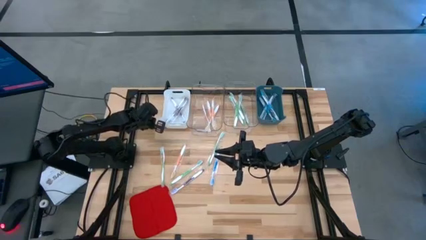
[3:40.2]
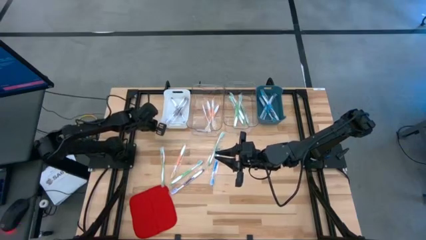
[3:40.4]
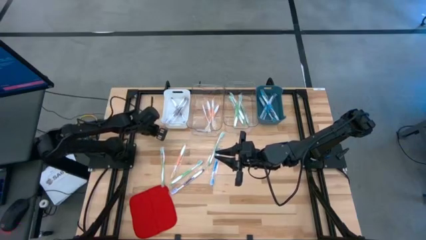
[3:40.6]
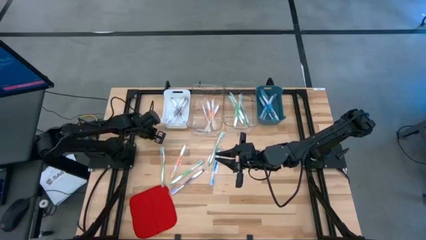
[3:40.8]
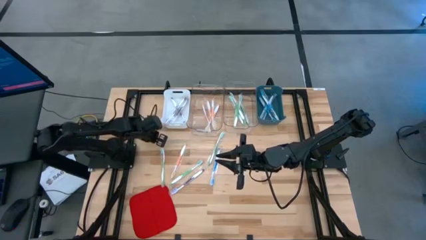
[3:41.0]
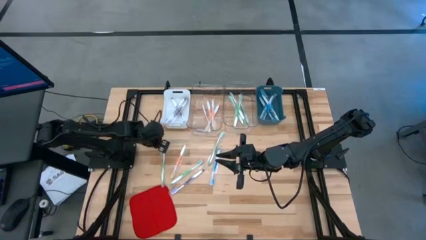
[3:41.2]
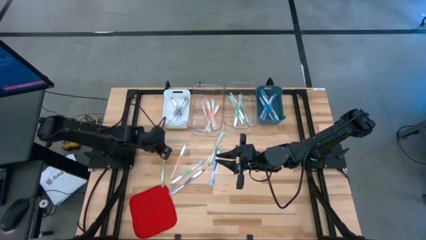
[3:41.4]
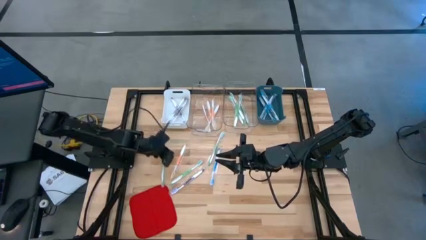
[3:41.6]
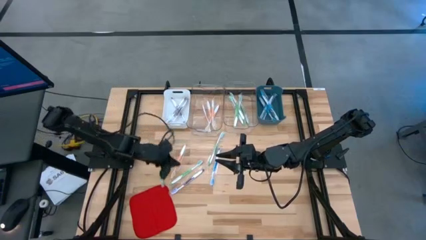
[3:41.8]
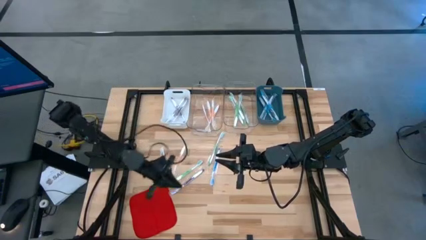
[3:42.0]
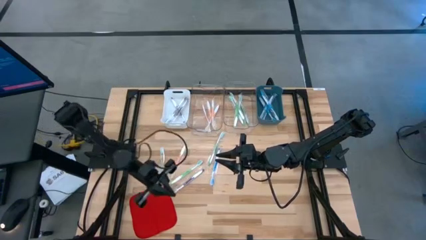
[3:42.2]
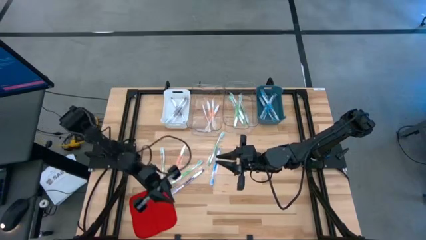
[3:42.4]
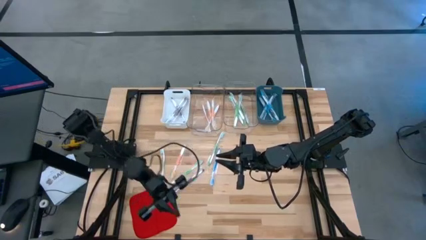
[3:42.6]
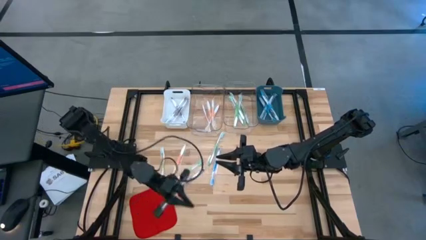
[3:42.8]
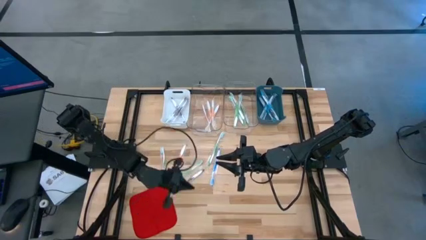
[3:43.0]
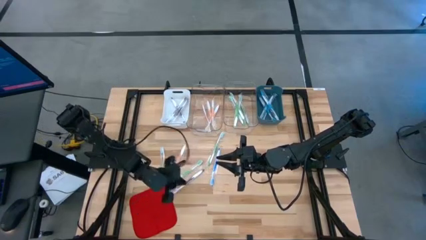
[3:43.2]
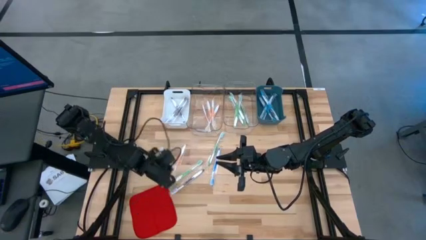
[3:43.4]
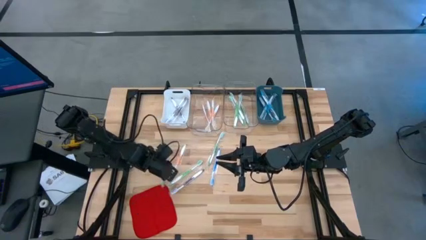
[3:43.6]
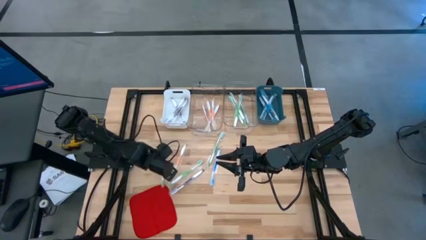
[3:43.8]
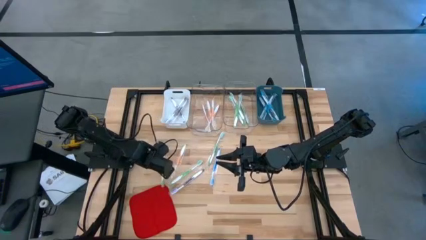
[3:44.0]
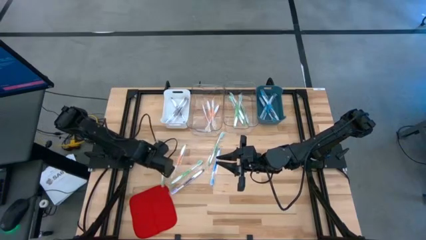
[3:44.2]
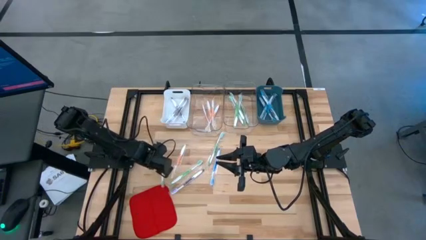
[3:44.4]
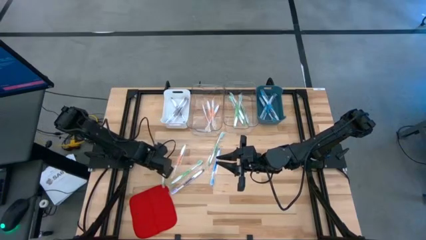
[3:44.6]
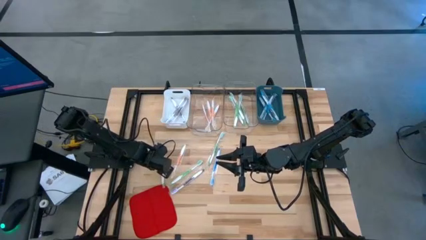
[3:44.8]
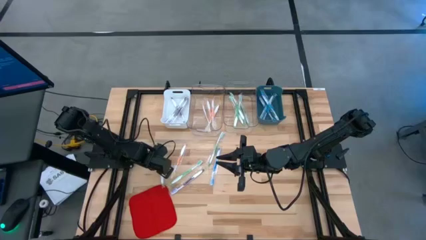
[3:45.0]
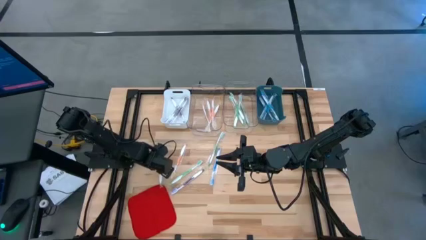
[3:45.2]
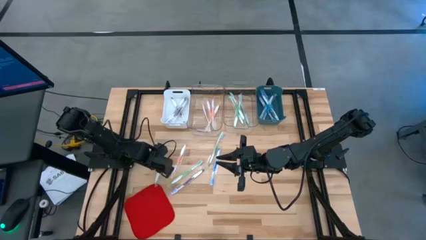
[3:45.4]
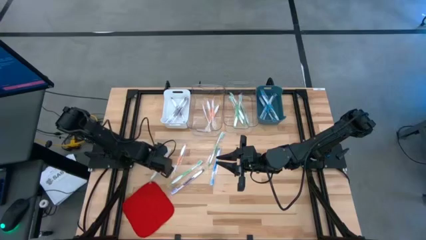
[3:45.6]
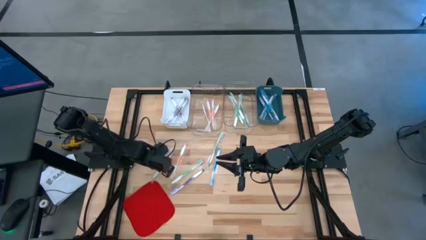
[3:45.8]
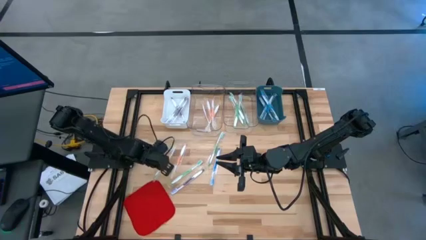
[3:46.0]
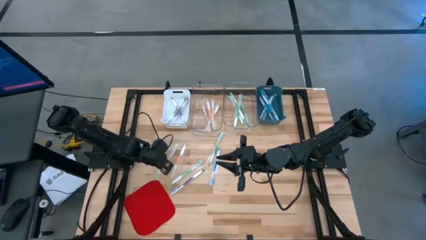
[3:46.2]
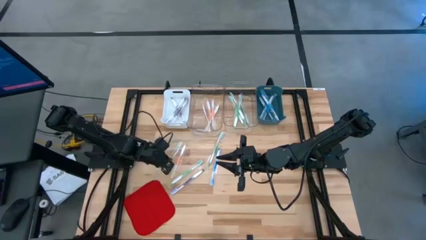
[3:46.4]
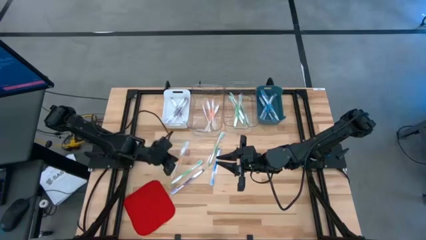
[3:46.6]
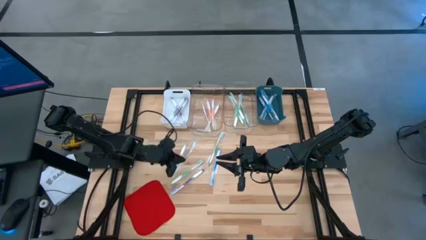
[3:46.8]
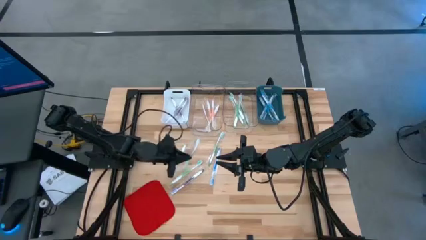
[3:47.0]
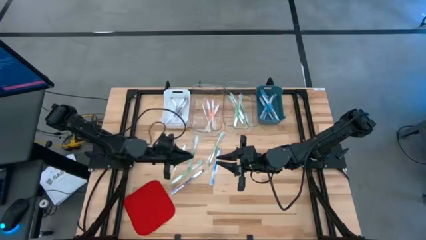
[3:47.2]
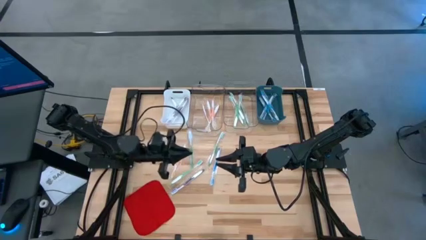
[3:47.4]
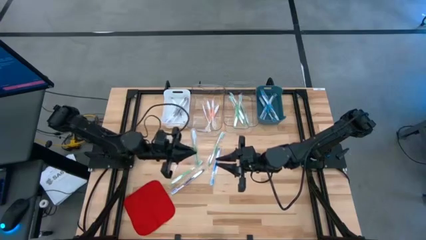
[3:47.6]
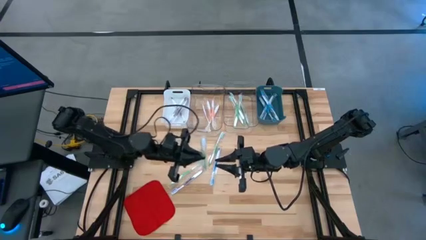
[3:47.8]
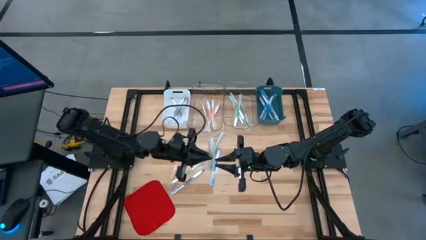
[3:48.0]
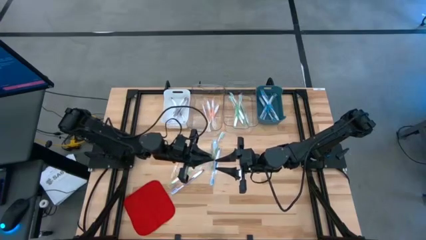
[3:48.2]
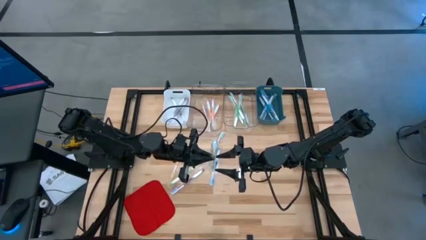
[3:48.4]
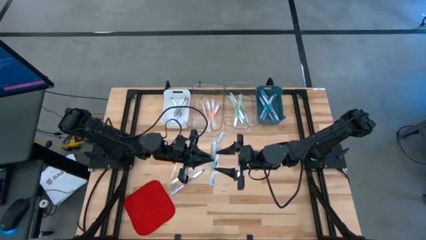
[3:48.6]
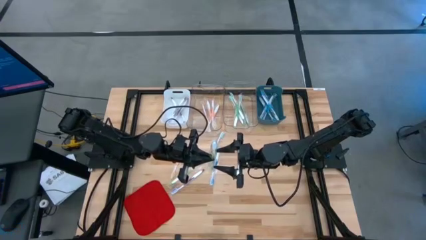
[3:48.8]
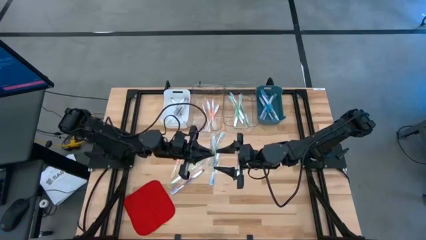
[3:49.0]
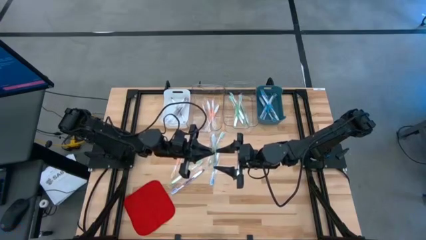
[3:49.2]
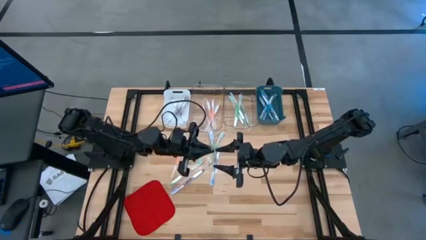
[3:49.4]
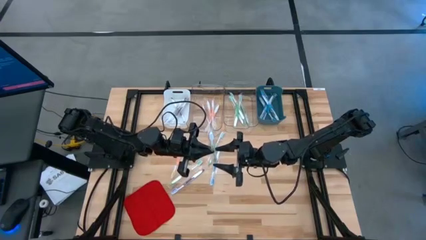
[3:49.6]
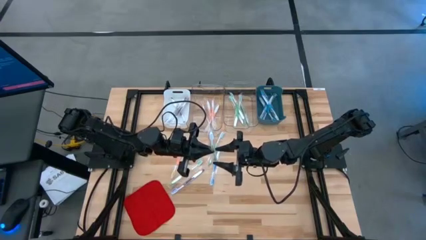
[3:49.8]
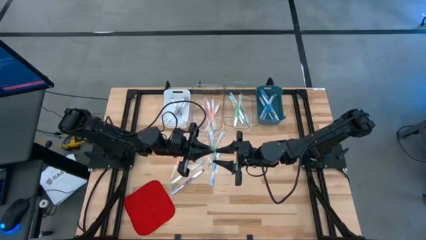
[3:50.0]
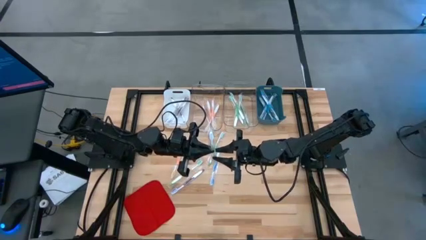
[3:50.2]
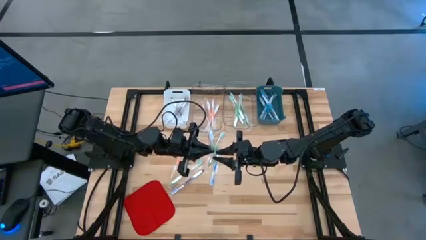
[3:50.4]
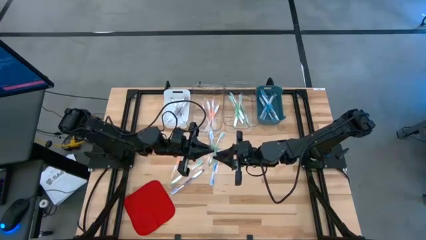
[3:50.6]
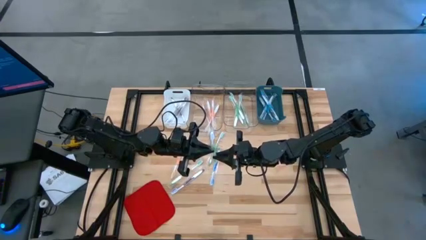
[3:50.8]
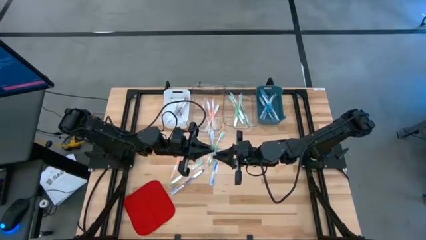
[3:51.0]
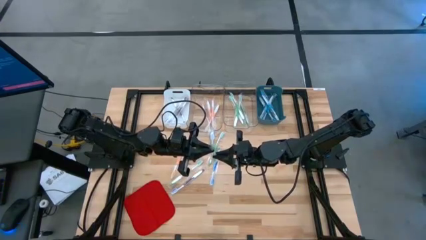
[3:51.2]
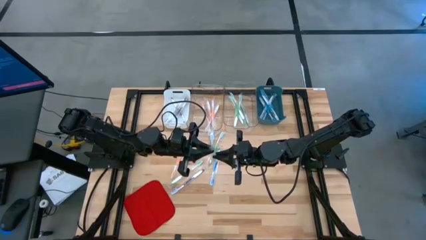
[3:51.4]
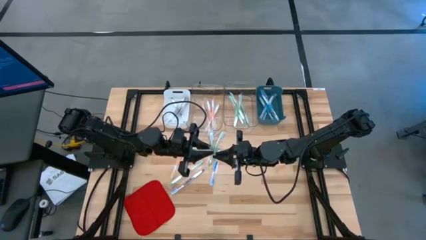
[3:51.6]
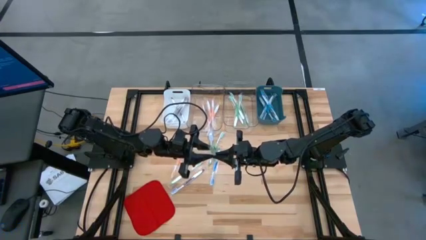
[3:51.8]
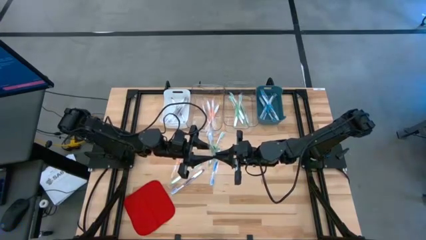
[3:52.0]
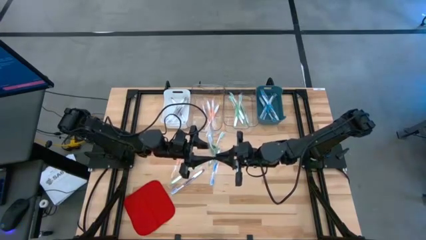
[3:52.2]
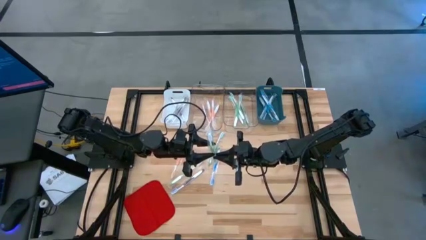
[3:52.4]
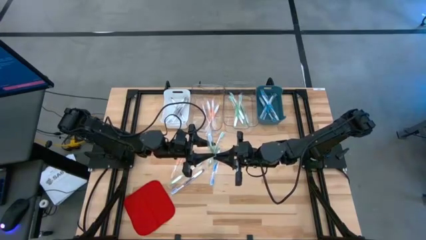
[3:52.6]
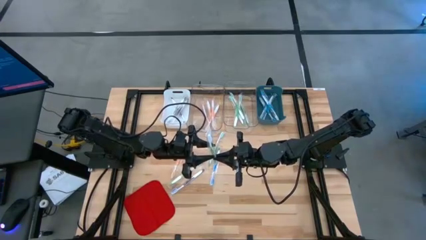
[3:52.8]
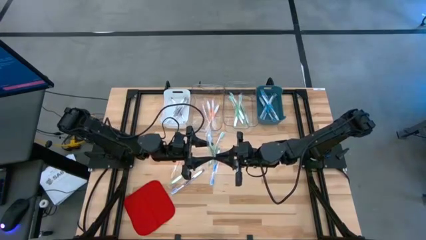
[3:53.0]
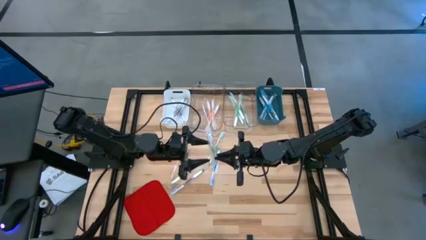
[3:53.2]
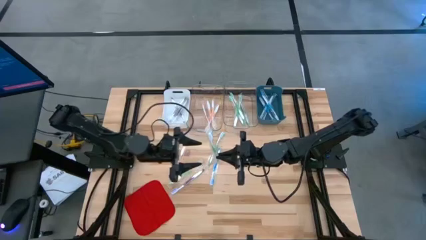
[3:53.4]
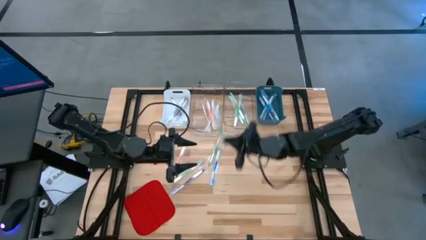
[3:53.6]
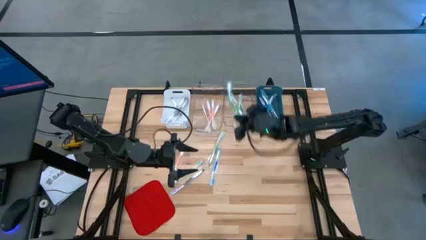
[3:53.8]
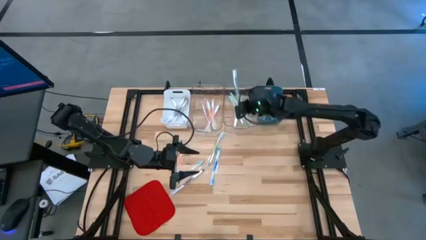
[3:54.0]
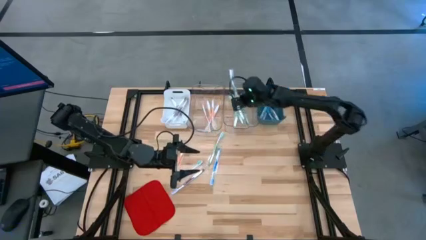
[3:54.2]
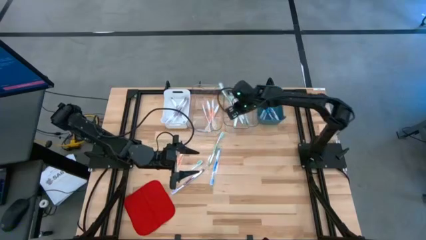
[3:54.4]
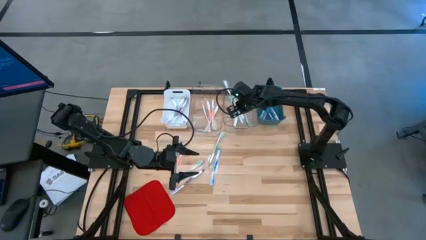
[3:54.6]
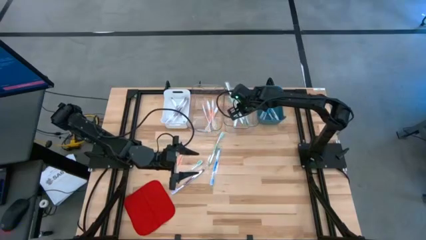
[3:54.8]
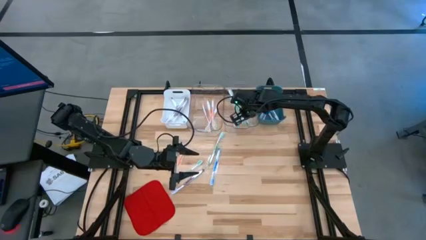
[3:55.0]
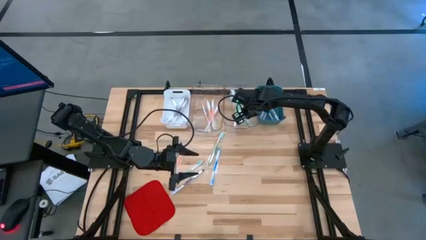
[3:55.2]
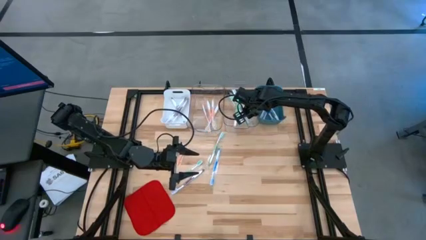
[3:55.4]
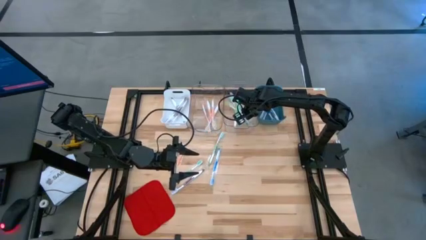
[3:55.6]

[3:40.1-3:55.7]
Task: Pick & Place Toothbrushes
Put the green toothbrush into the right transparent bin
